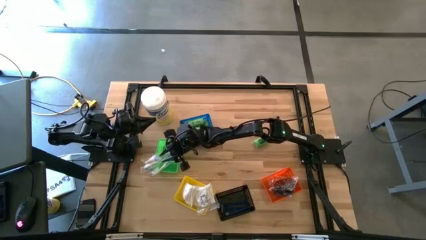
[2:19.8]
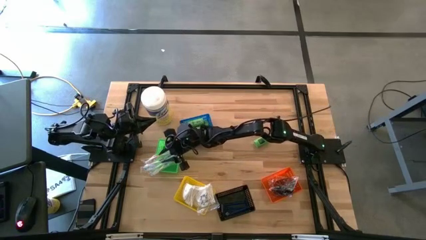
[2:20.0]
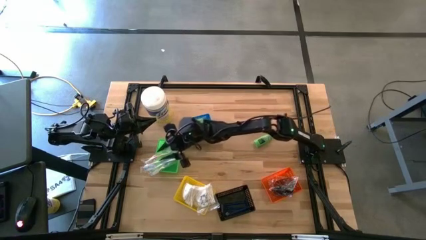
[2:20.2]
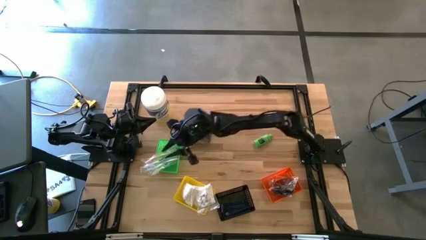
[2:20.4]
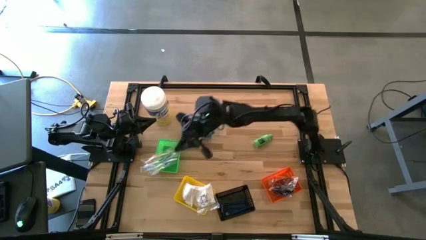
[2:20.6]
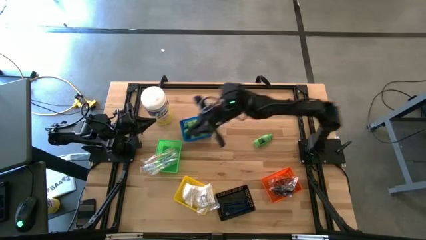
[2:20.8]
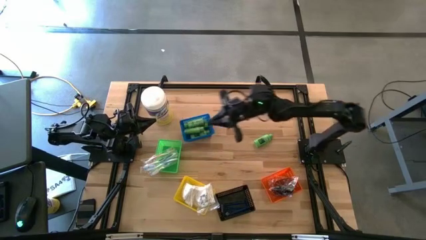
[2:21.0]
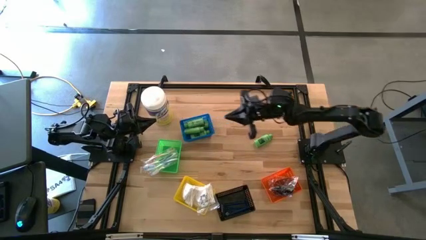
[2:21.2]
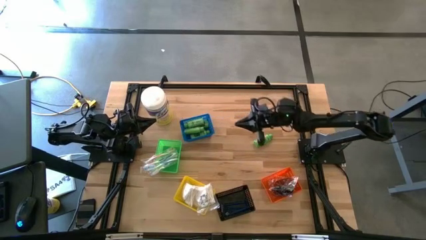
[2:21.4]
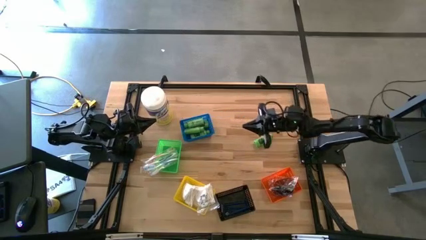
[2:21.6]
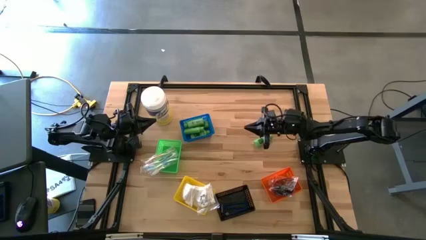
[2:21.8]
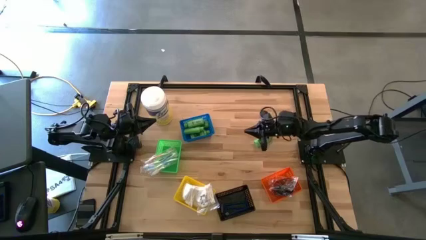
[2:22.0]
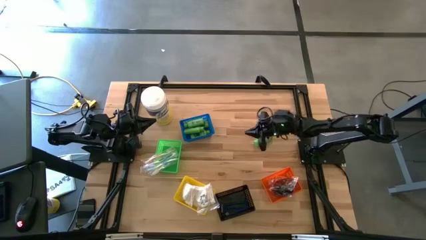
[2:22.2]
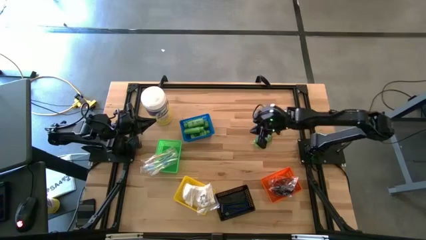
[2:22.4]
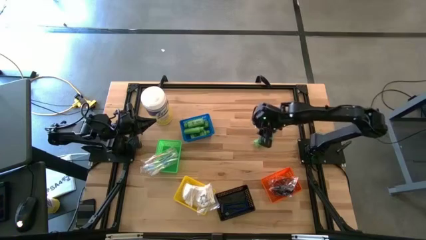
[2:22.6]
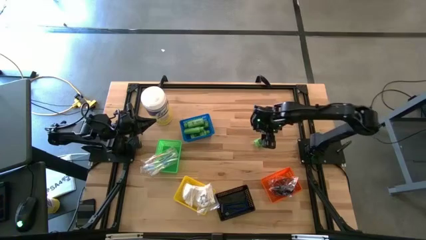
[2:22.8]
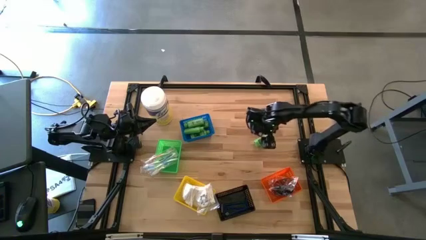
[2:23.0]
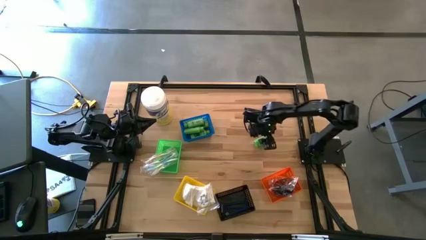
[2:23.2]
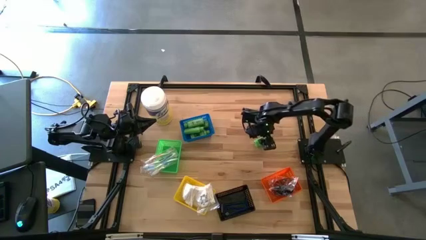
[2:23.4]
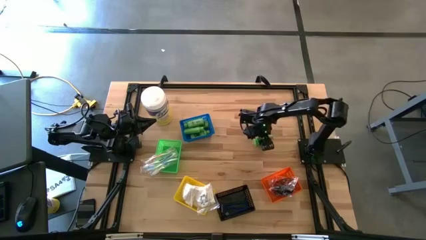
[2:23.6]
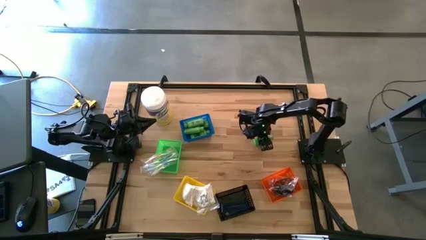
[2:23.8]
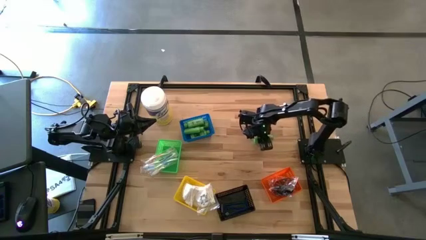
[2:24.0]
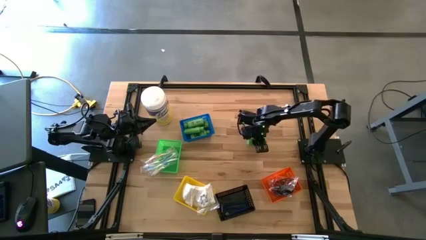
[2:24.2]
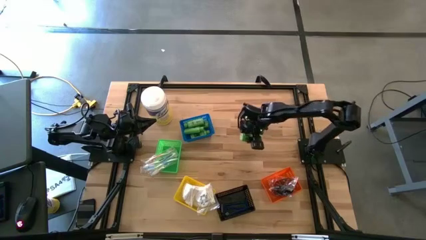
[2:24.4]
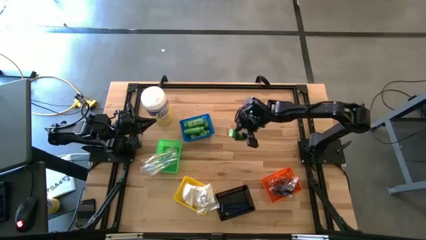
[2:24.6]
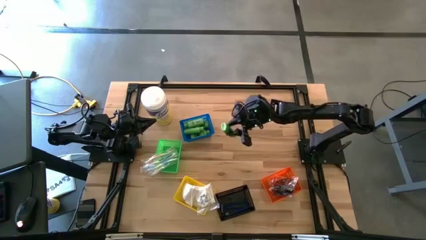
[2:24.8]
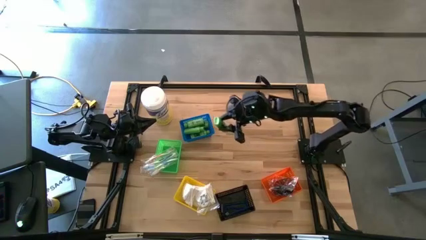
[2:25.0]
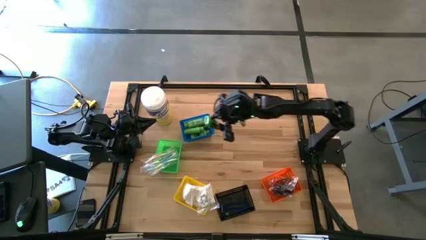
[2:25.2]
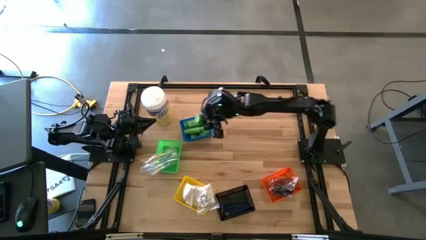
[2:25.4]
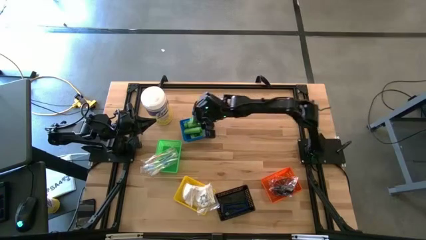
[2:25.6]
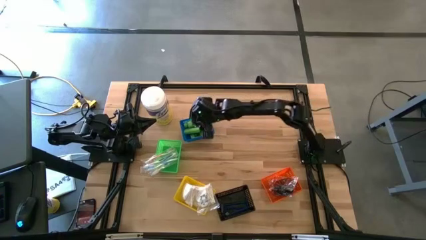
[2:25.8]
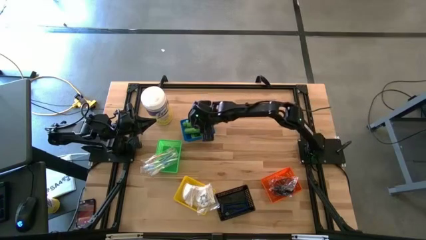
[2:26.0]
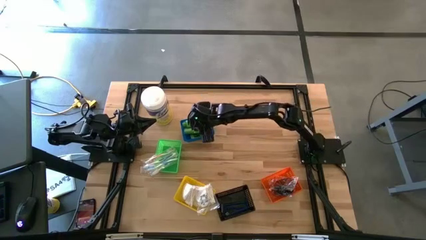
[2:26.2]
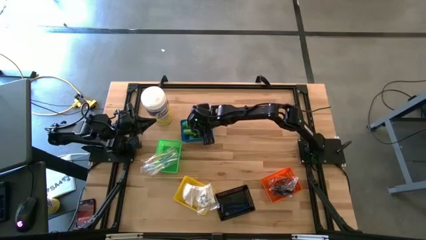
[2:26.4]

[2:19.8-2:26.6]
Task: Pick & Place Travel size toiletries
Put the green shampoo into the blue bin

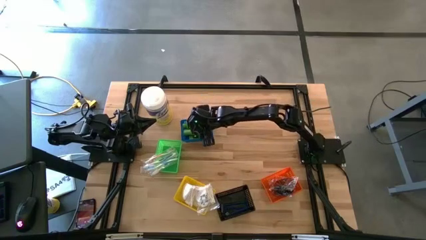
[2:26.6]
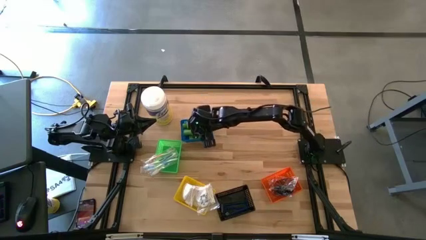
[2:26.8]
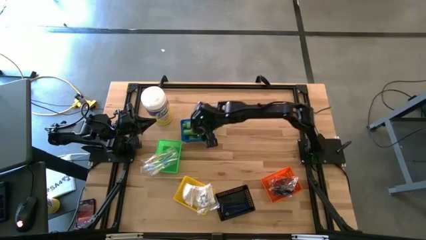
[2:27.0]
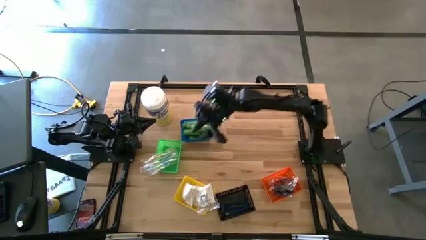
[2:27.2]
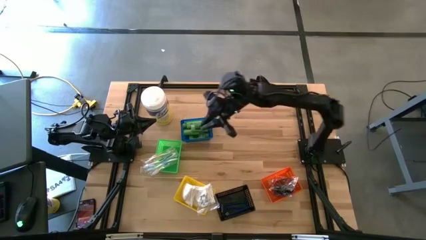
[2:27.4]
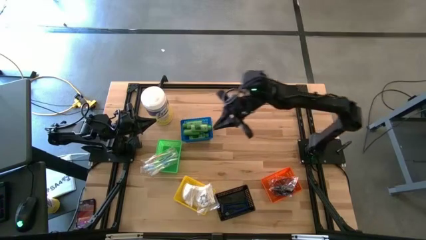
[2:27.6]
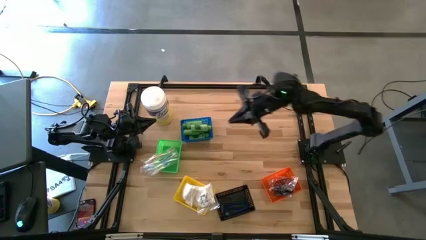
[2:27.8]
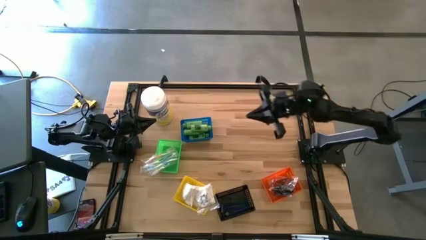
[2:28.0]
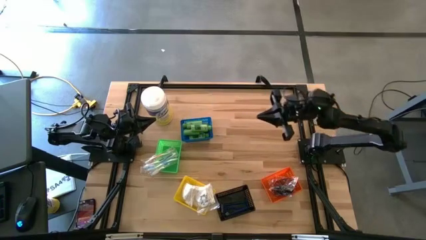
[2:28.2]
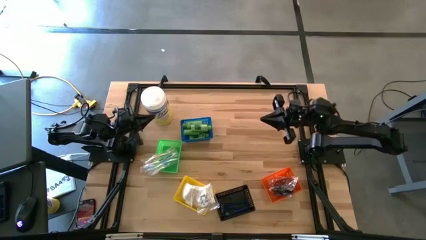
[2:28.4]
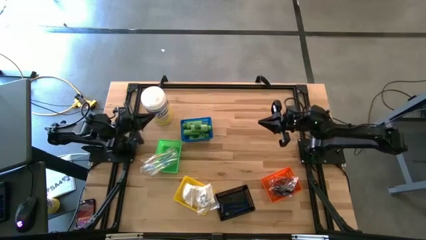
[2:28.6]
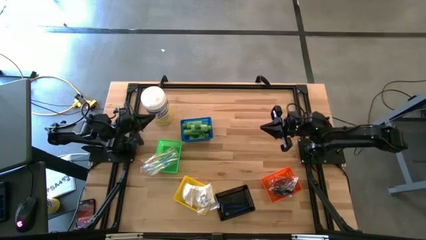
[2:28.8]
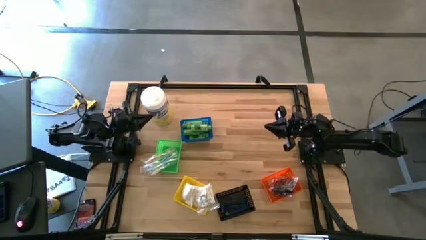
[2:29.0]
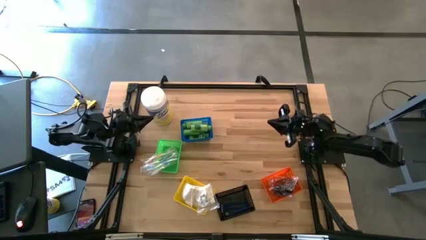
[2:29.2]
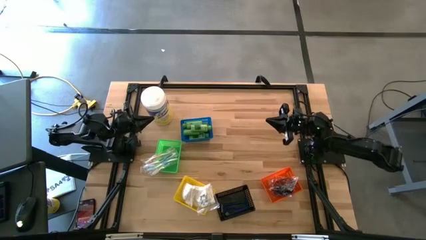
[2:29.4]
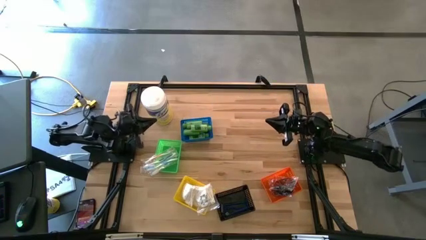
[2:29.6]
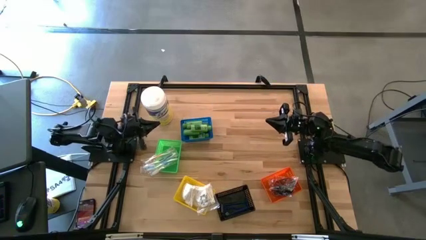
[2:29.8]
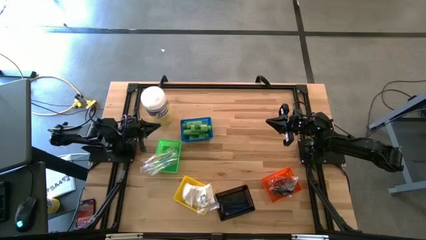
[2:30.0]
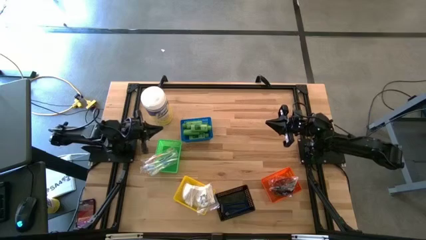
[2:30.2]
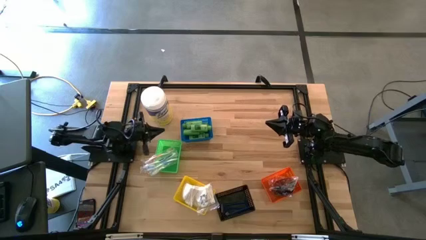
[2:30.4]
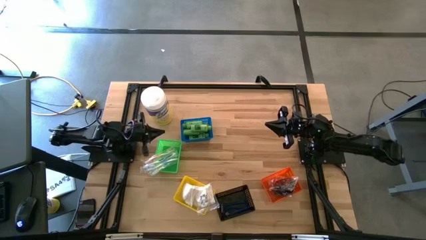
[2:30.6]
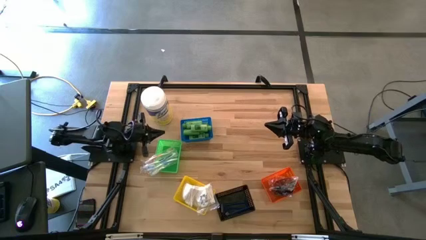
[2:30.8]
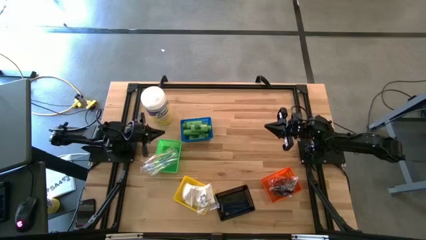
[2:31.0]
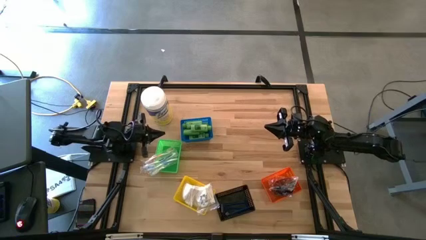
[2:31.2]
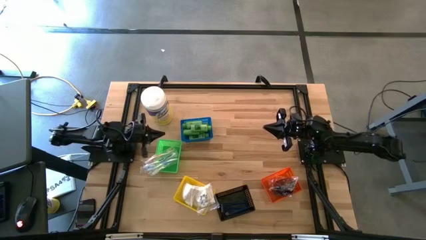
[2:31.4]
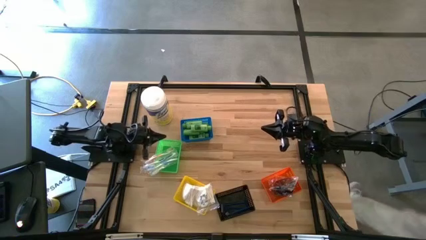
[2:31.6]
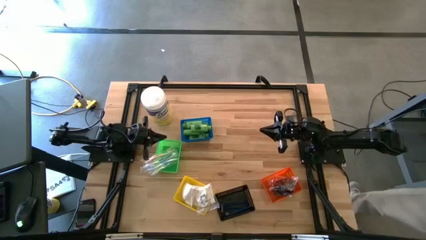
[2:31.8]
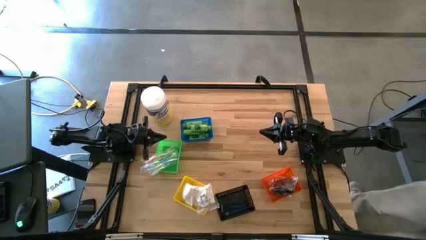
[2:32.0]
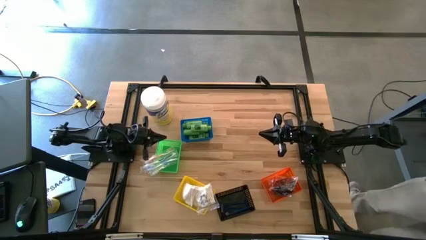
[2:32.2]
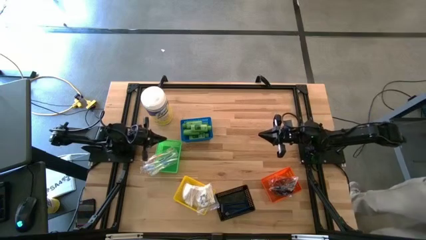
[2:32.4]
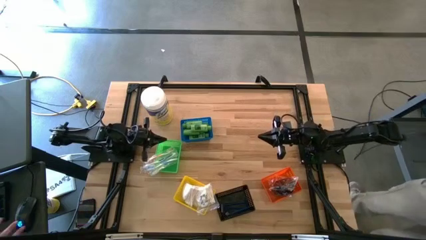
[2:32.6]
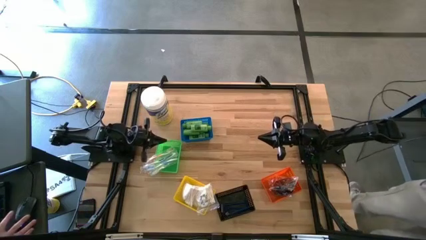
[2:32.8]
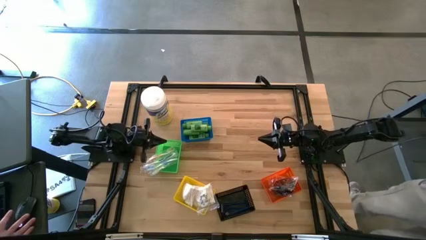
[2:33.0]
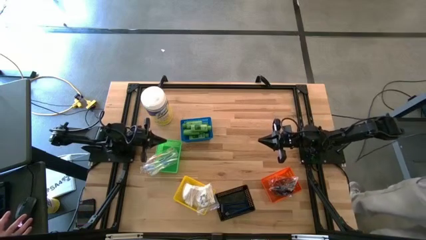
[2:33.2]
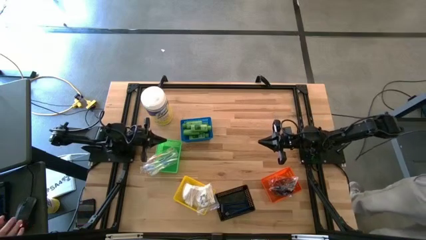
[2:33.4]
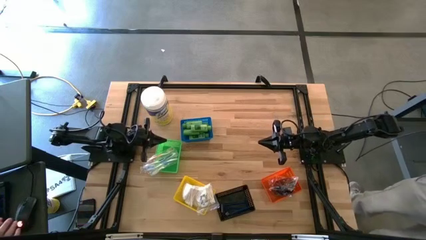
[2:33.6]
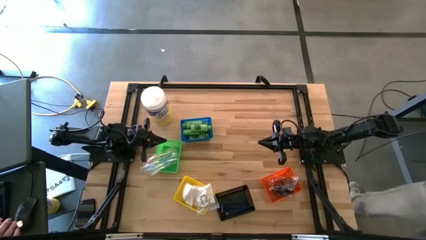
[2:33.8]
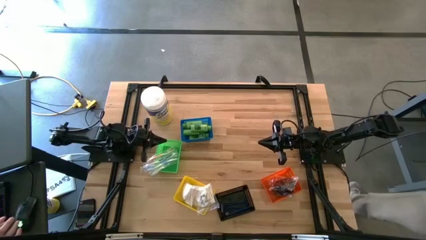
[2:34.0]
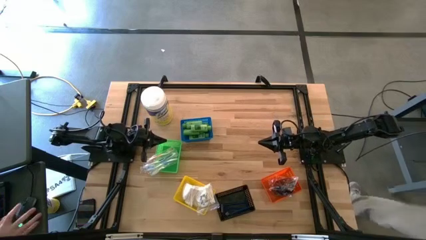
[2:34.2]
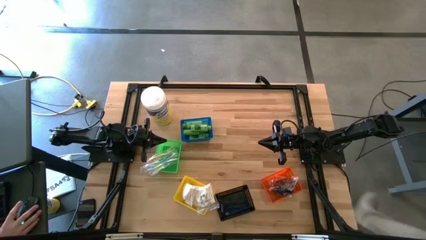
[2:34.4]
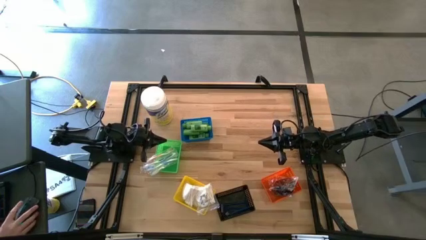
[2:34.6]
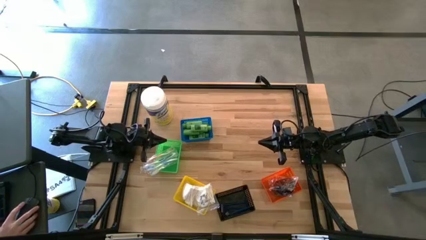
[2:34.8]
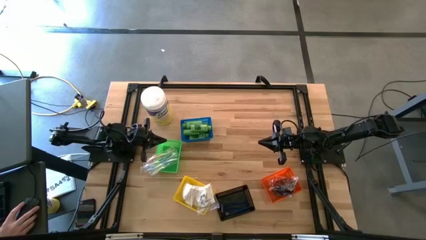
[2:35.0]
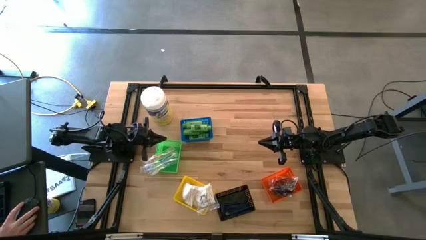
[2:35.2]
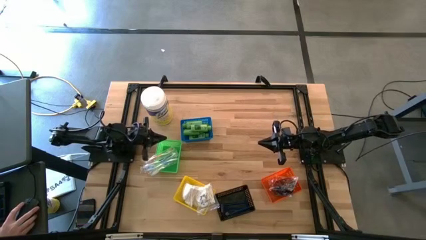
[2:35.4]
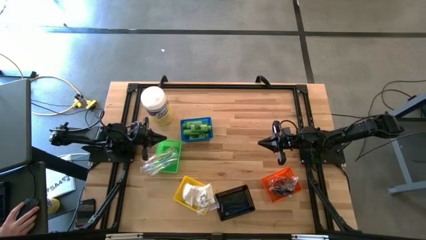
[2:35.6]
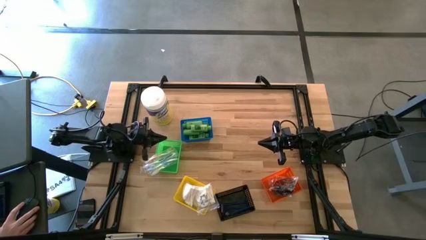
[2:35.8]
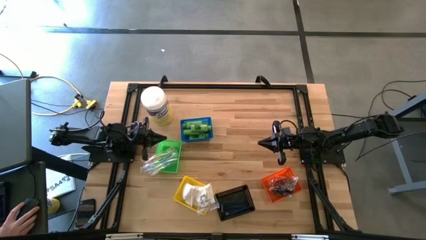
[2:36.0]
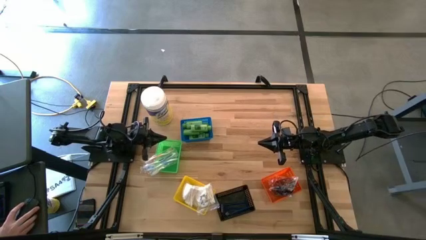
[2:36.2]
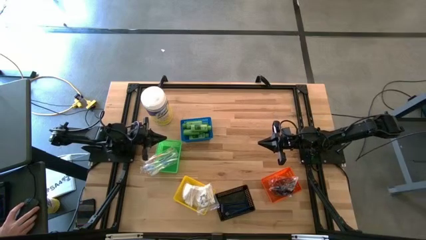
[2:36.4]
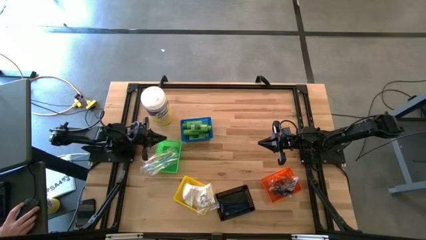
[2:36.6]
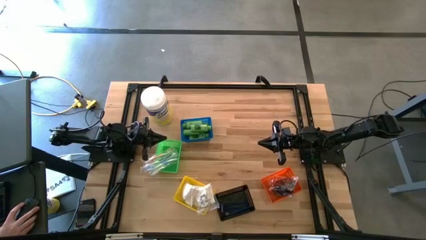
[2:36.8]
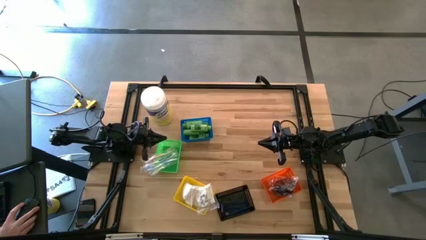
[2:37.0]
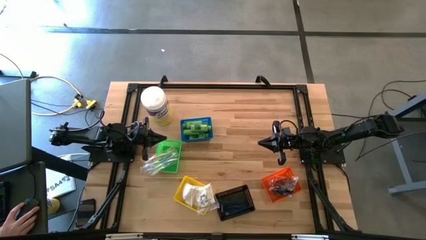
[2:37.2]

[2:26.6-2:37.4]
Return to Home Position
